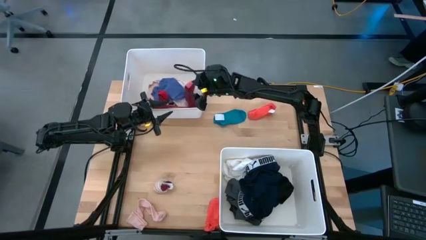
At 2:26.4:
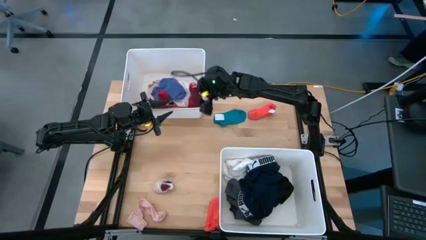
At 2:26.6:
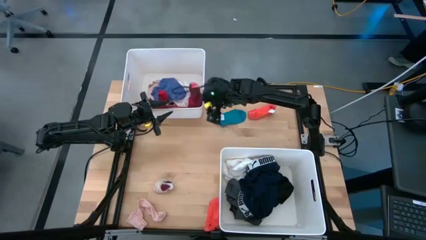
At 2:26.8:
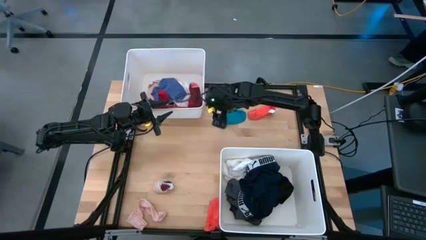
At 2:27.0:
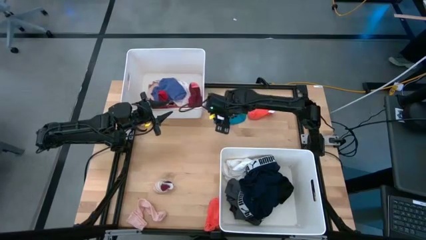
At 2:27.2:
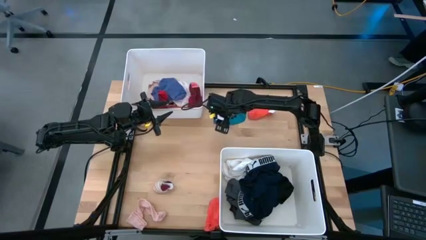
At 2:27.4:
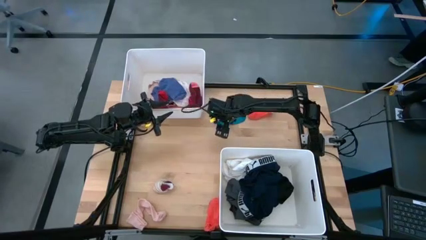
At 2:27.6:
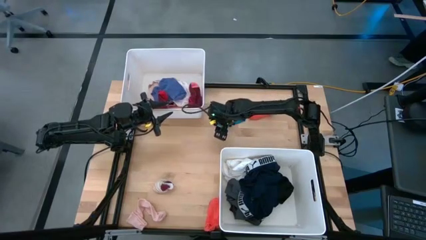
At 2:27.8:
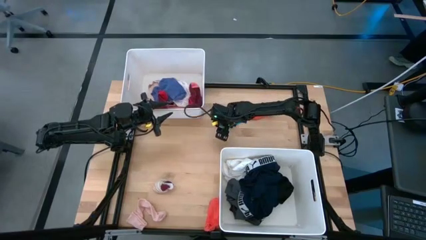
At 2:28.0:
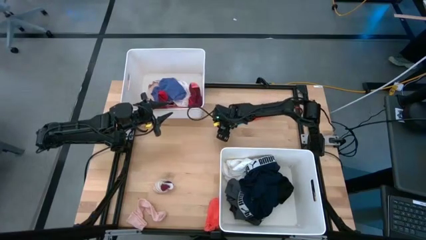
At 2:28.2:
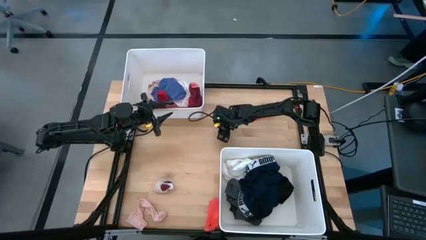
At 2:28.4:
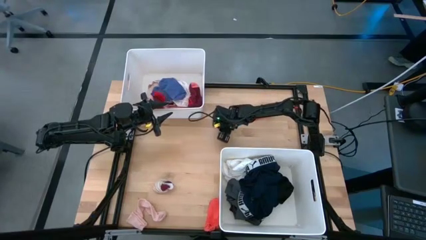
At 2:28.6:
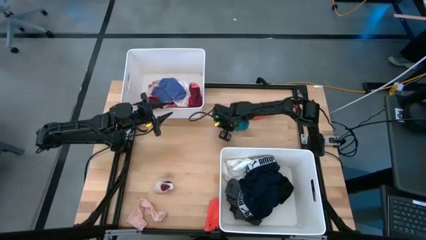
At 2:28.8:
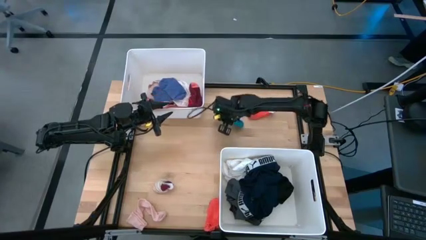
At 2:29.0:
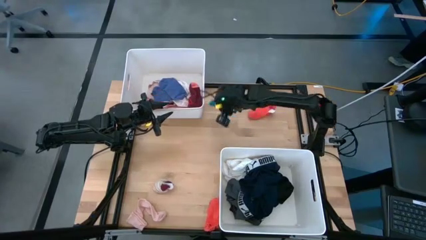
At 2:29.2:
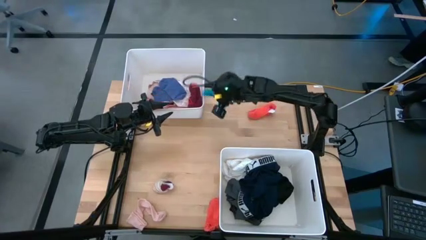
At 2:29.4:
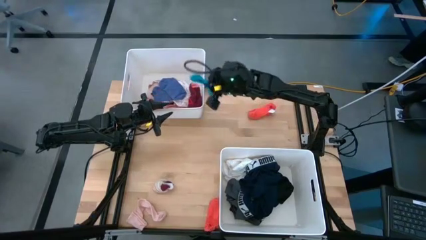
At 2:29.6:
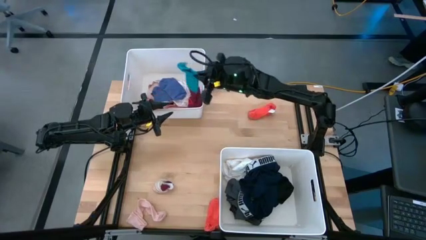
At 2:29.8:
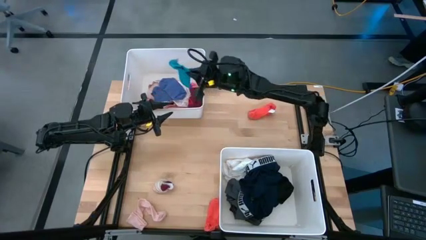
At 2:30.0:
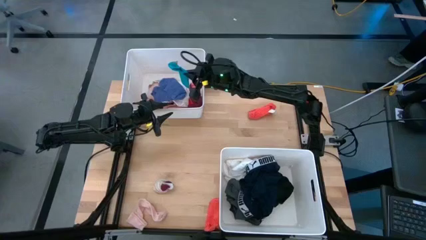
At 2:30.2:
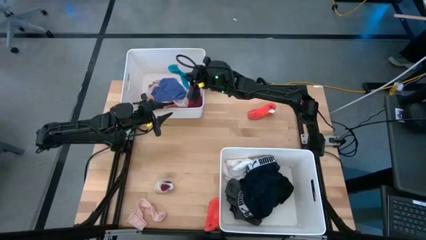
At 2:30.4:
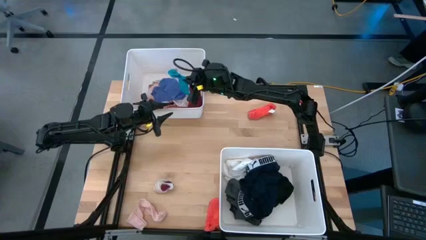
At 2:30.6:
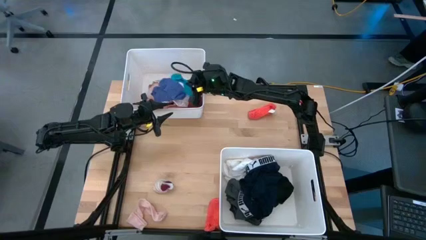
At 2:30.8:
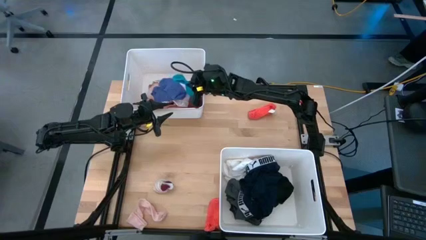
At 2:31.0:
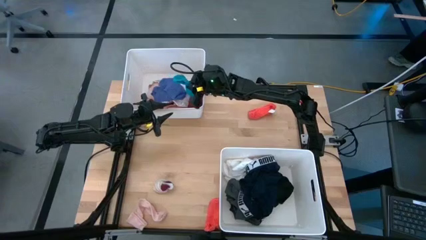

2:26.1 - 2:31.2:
Task: Sort clothes
Put the light blue sock into the top white bin

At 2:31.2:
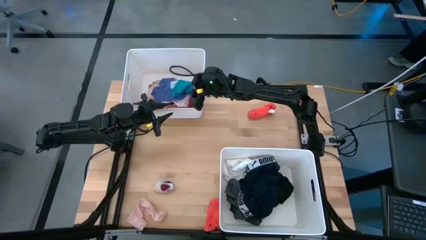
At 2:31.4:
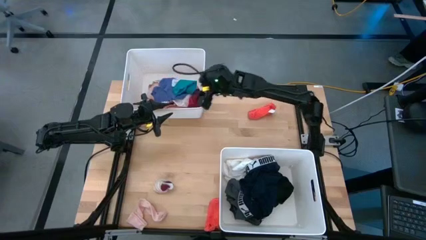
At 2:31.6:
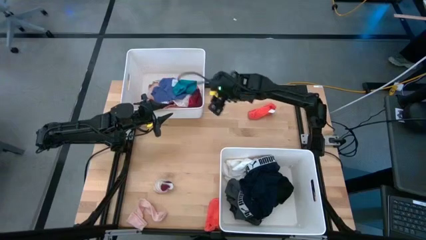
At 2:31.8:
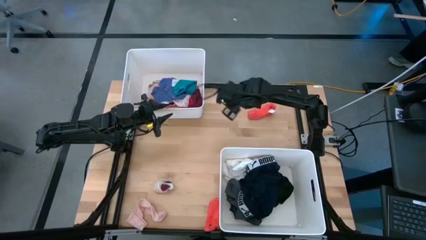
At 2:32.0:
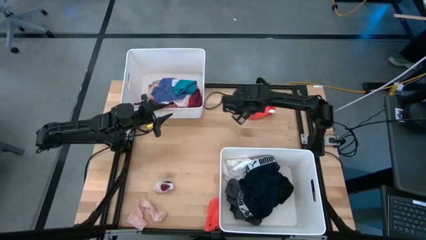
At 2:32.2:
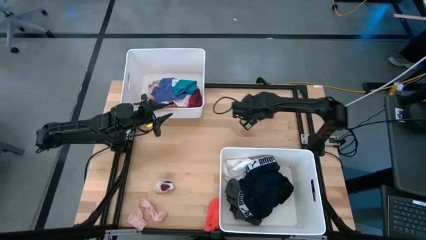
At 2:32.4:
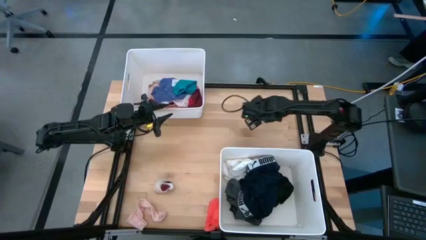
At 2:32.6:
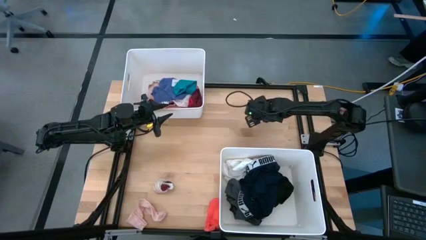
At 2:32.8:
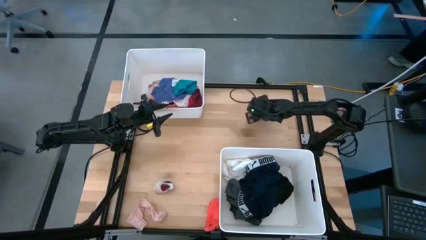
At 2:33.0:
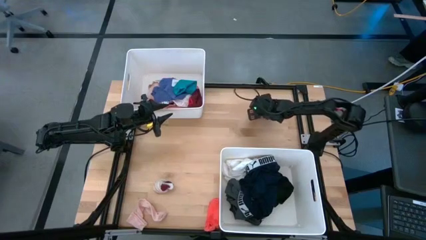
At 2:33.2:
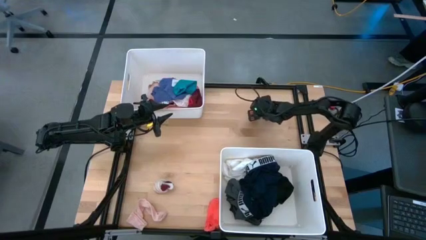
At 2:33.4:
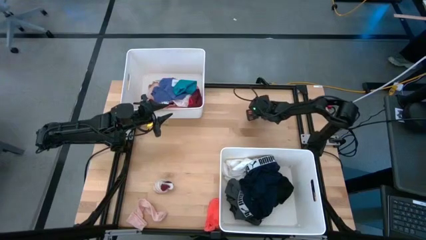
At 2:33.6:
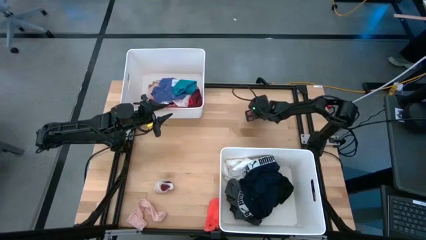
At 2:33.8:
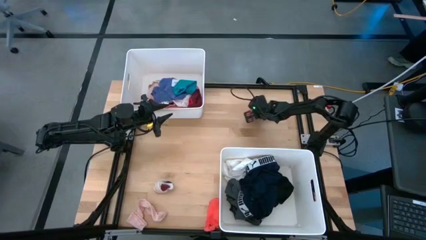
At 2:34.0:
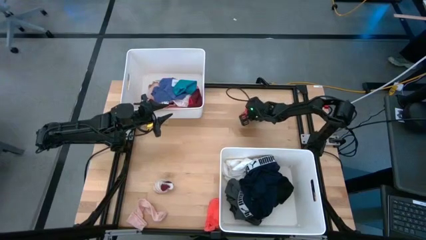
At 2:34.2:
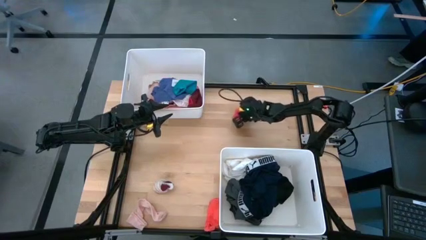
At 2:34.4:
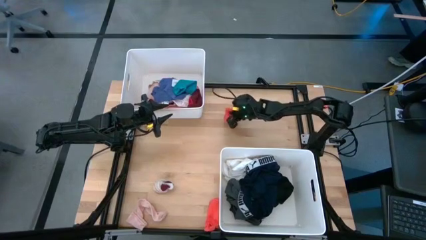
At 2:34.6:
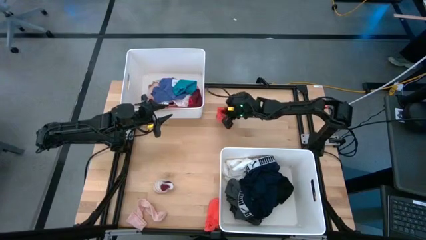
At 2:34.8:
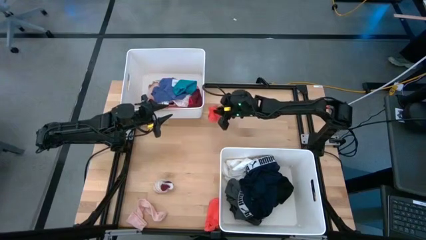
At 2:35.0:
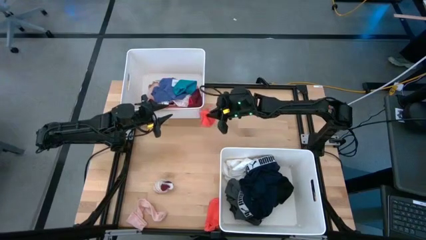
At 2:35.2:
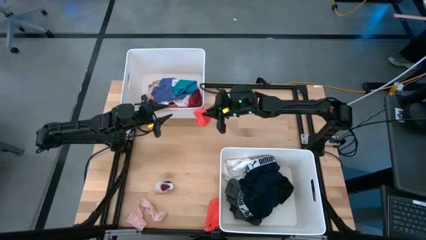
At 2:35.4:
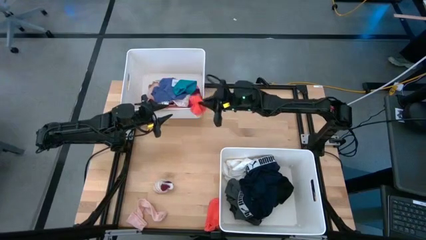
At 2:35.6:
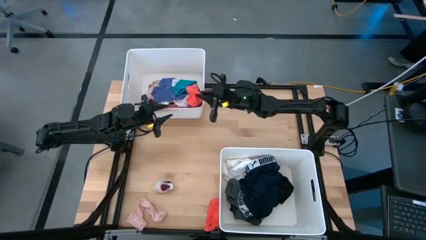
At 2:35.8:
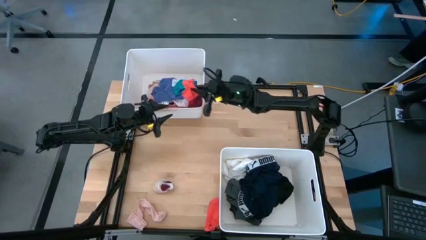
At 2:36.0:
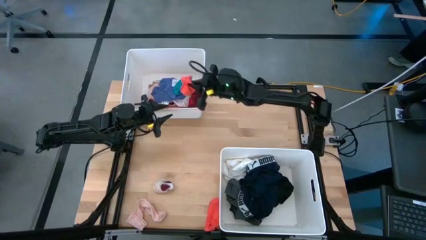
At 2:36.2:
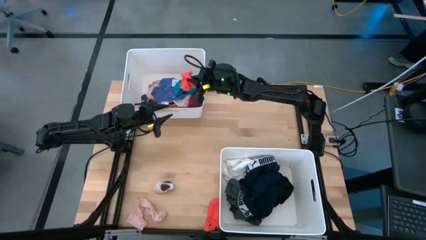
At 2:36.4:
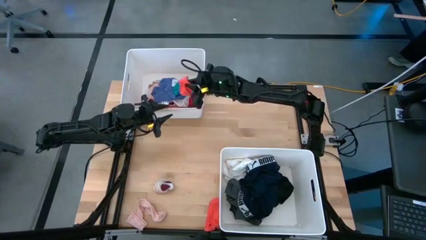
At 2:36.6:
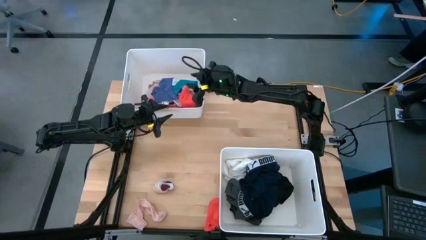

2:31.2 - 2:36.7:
Put the orange sock into the top white bin

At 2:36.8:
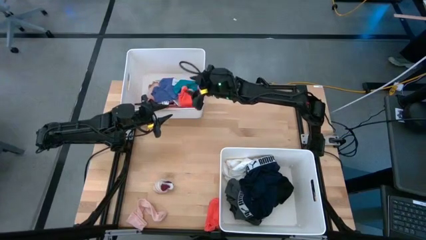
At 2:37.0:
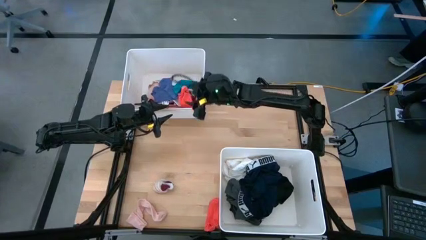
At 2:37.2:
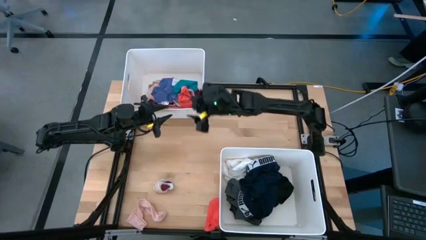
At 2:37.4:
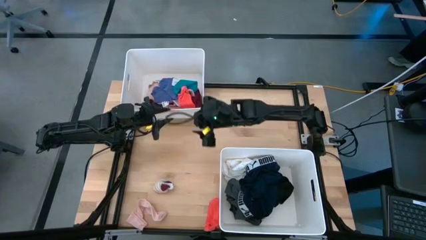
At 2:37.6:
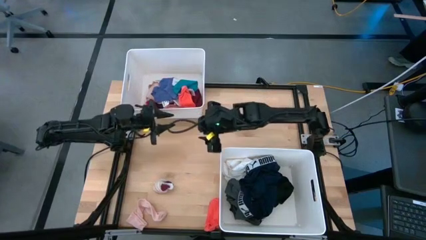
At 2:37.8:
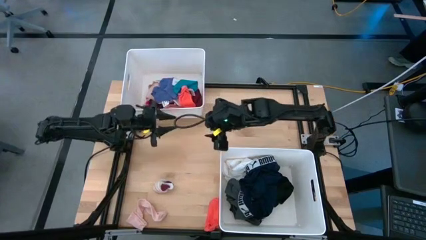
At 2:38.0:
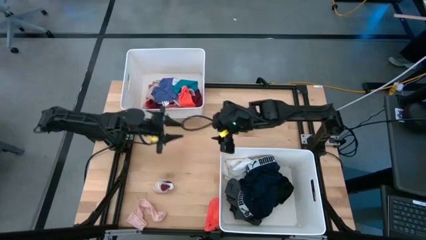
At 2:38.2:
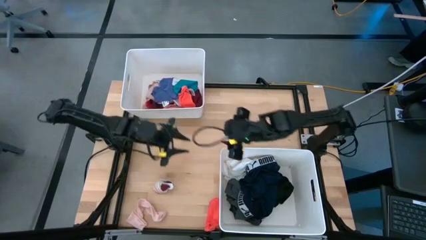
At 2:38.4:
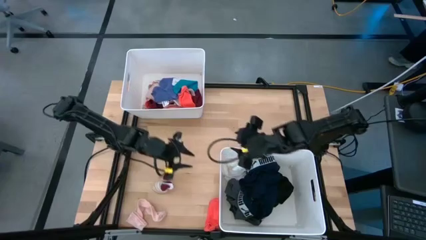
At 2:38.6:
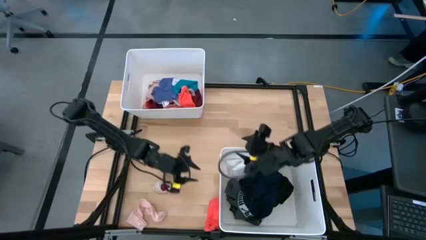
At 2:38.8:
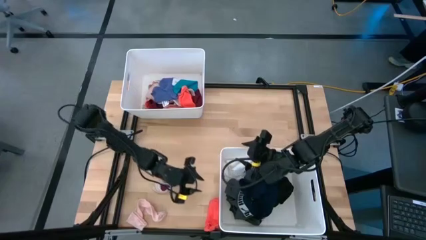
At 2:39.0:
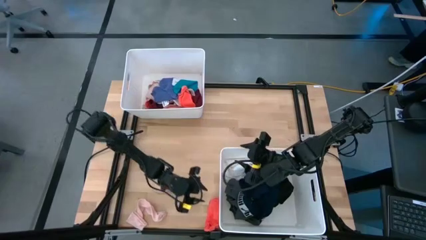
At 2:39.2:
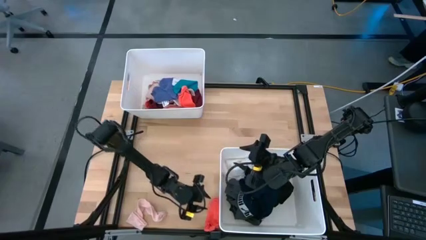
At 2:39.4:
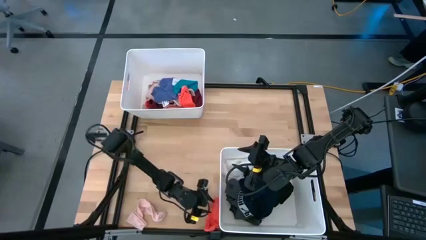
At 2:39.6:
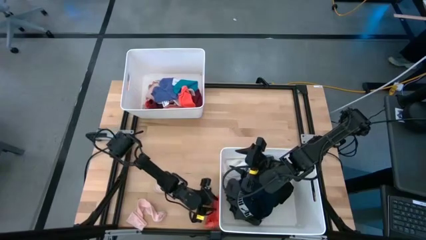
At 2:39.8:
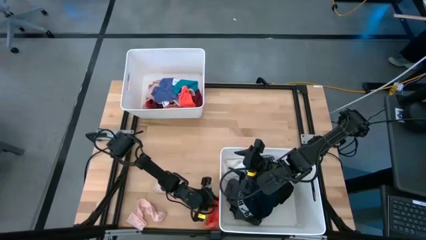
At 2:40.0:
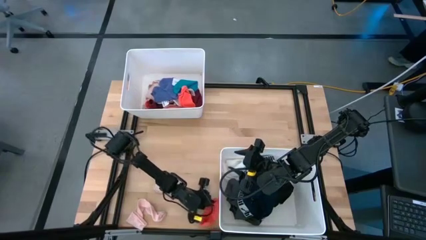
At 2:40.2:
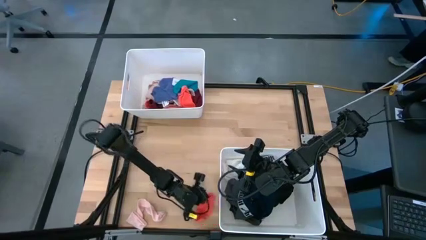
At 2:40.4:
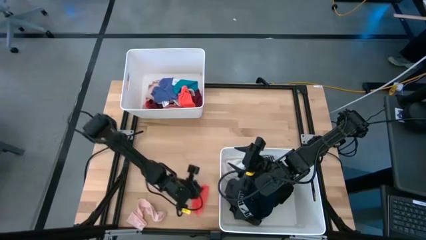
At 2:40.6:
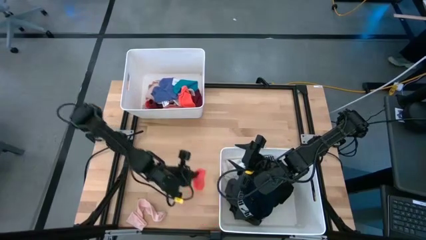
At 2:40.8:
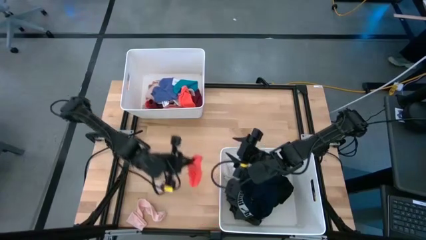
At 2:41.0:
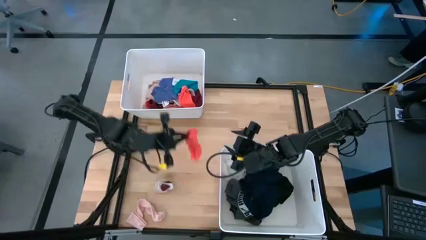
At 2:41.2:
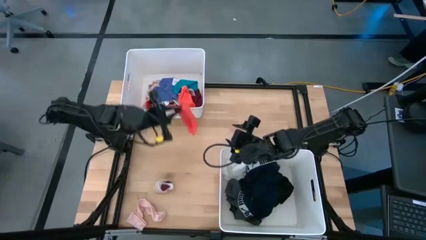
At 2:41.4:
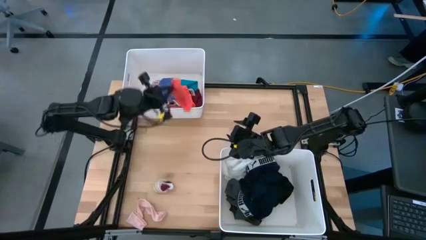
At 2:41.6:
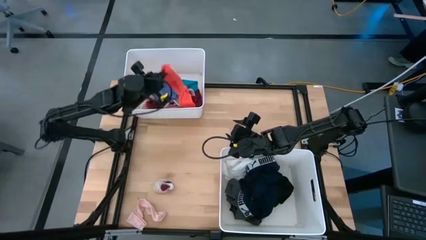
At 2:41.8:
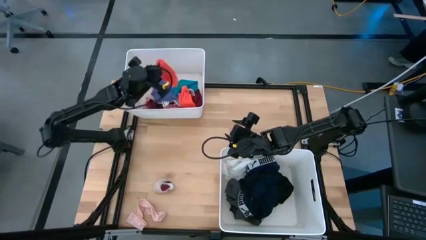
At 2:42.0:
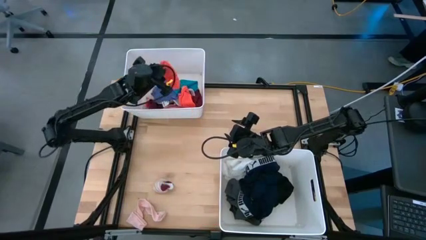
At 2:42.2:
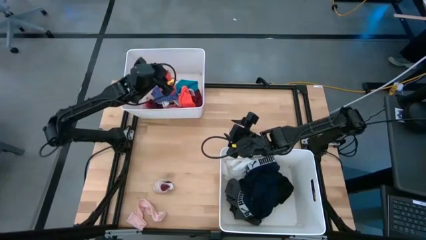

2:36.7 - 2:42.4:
Put the orange sock into the top white bin
